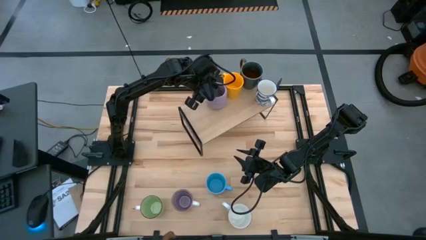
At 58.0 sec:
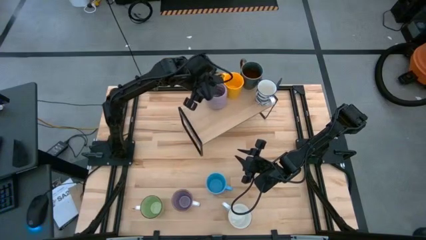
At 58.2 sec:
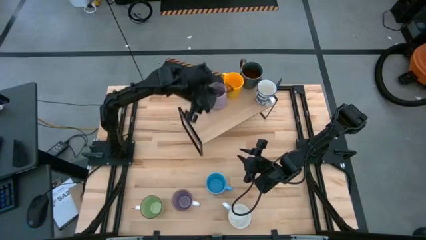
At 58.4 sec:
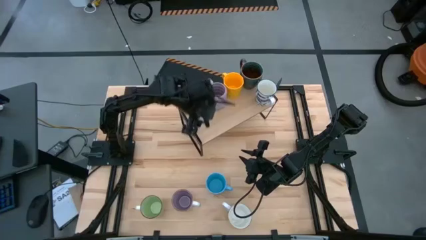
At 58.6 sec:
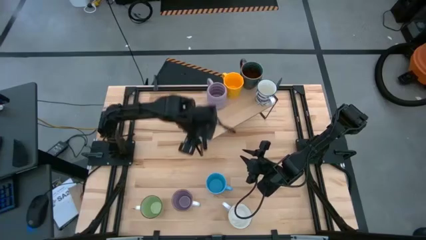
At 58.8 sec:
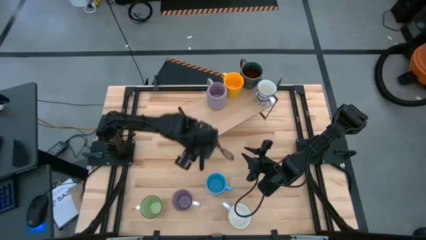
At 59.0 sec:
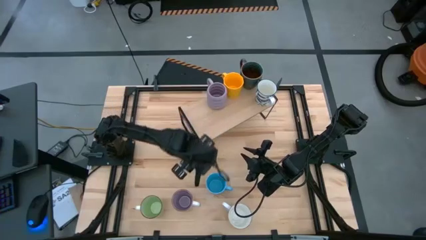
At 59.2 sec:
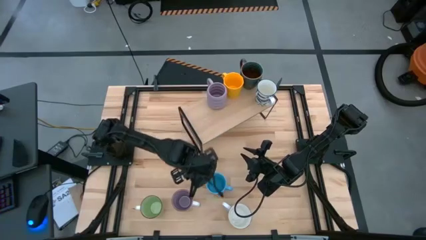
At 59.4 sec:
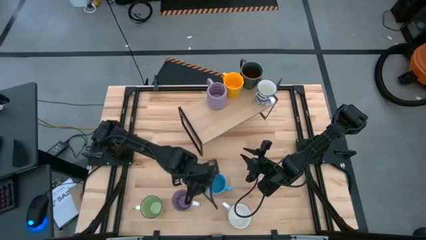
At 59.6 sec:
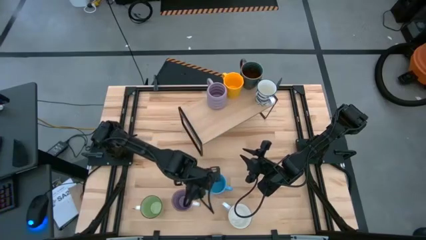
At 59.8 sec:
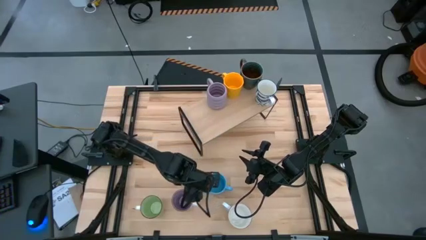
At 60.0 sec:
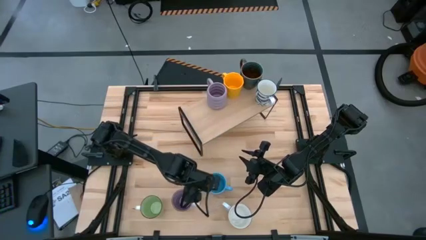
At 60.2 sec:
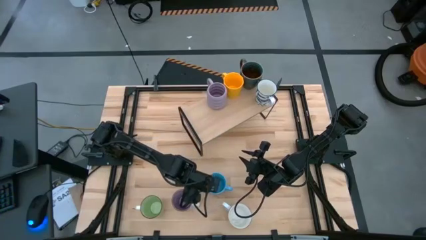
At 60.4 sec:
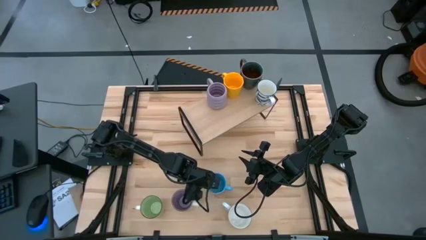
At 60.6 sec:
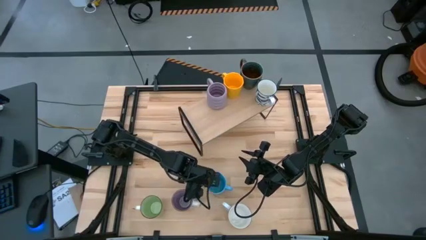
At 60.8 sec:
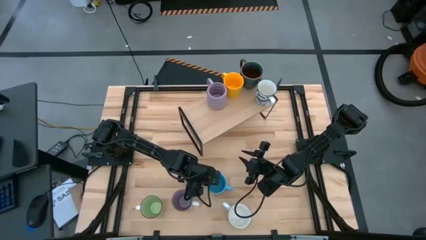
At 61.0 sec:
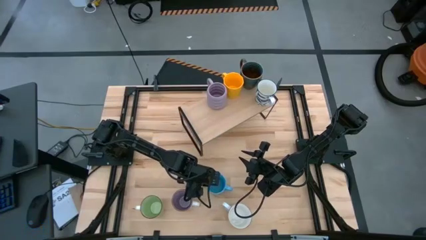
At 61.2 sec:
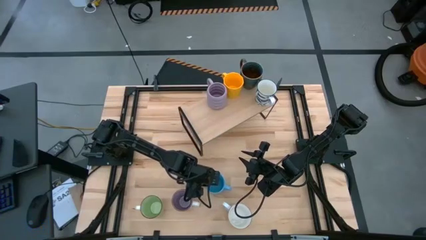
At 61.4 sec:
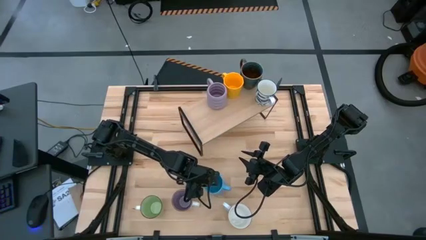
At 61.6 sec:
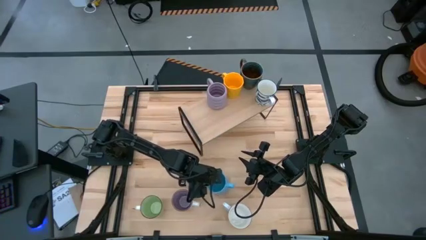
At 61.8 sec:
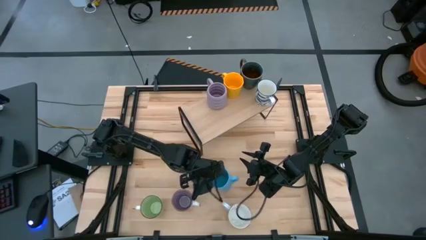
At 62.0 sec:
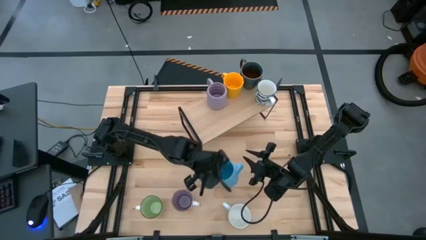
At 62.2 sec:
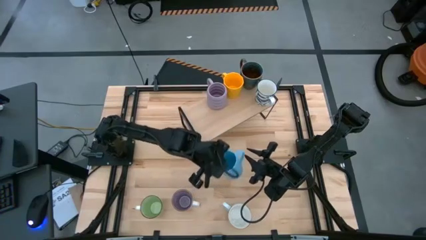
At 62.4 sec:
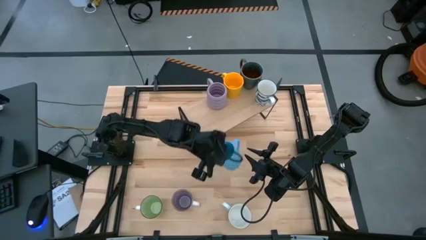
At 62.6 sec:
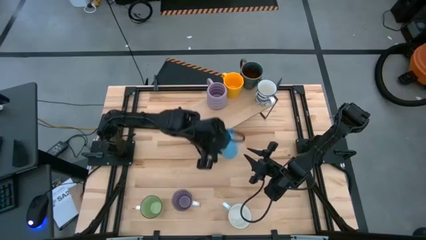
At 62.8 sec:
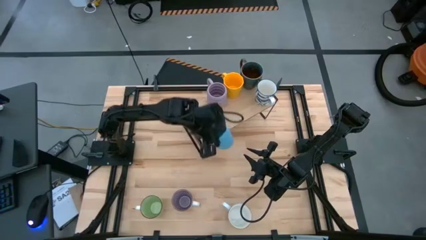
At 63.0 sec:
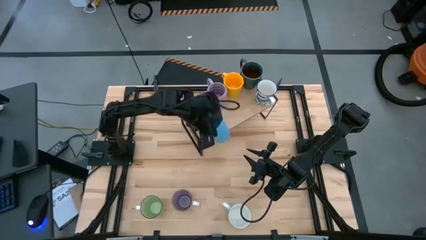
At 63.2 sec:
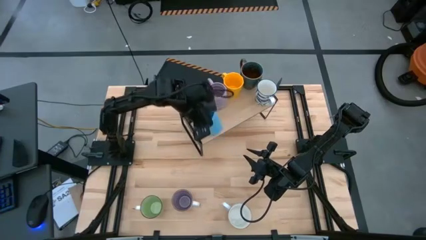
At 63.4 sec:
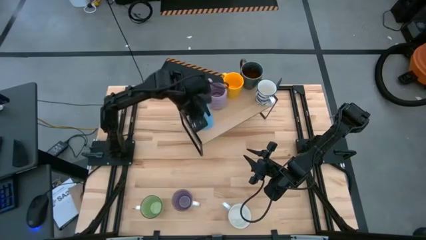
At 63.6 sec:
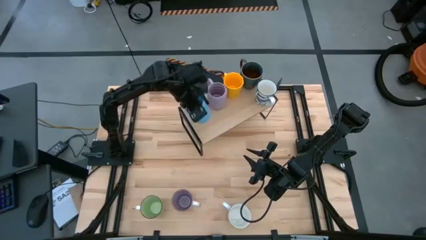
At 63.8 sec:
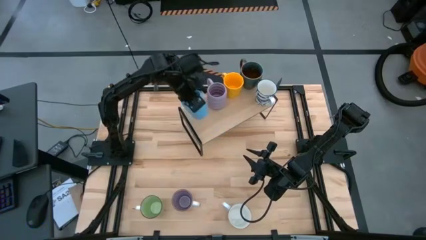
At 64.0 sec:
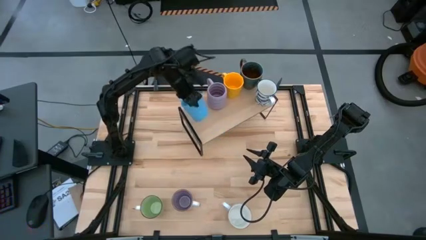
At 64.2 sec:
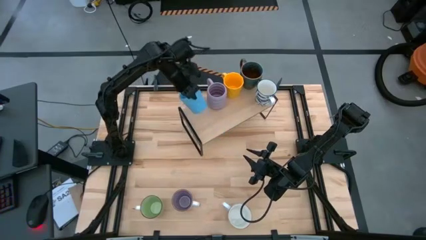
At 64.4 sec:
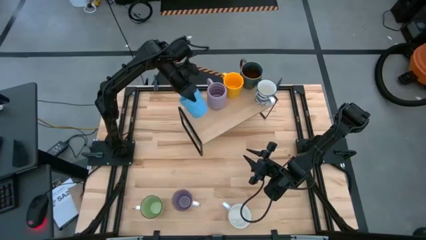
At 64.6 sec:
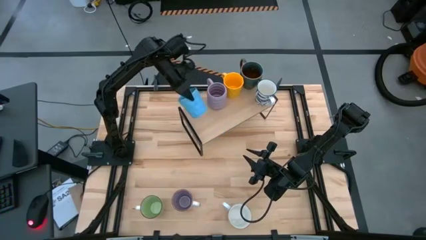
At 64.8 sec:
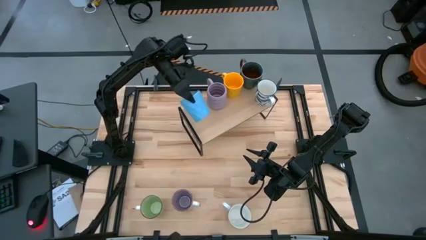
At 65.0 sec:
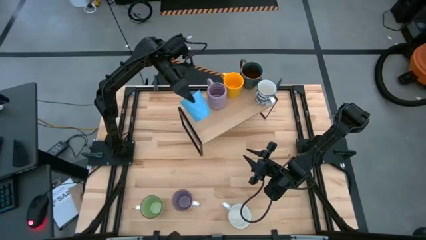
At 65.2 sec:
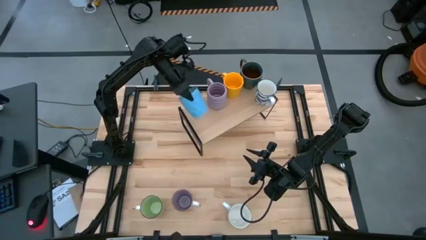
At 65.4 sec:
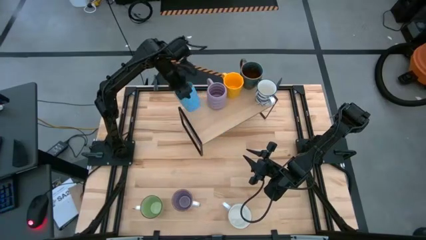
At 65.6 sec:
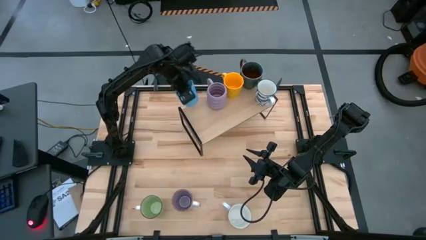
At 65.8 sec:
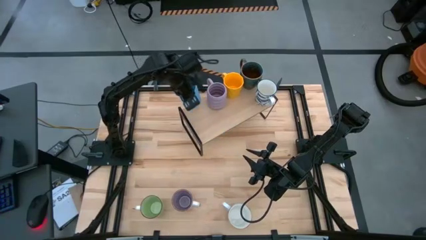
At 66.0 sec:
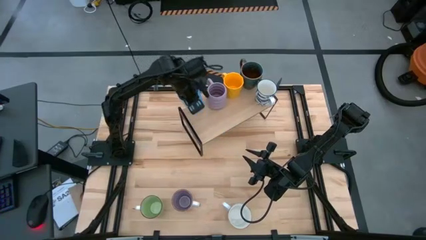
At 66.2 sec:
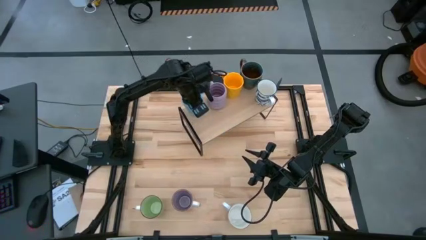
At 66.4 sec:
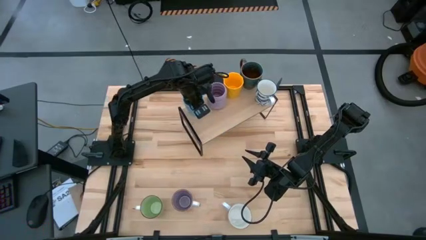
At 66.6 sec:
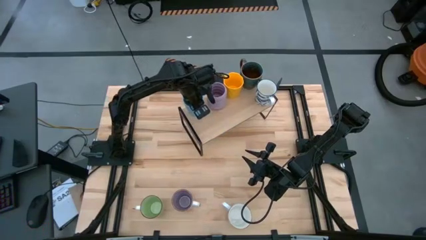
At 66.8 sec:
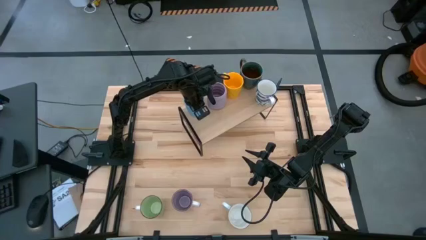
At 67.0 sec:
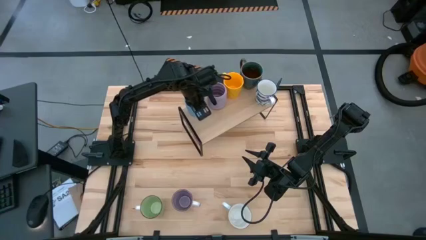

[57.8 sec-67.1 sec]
Task: Place coffee mugs
Put the light blue mug on the shelf
